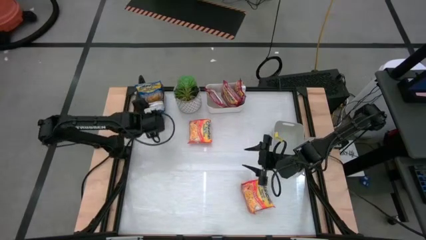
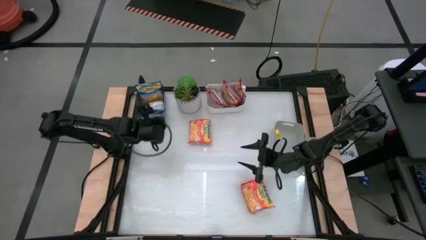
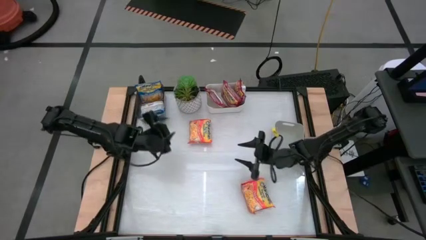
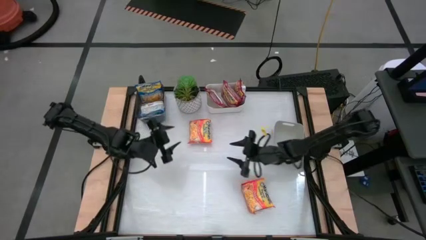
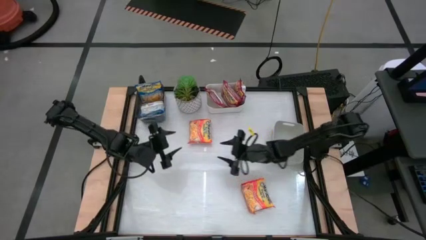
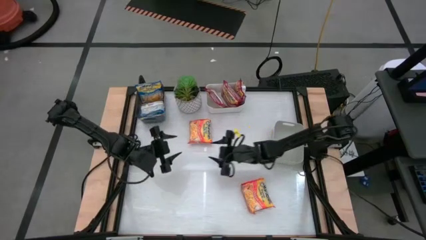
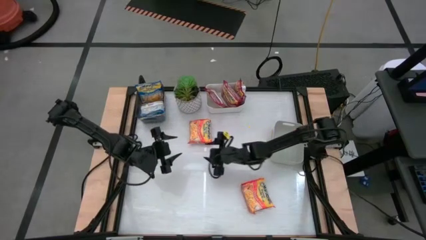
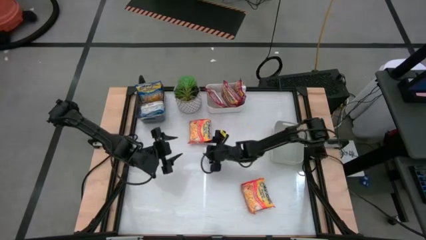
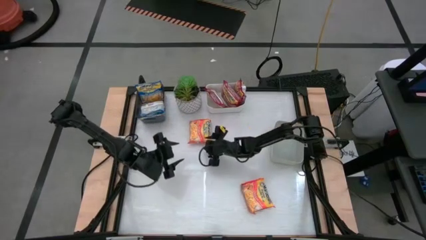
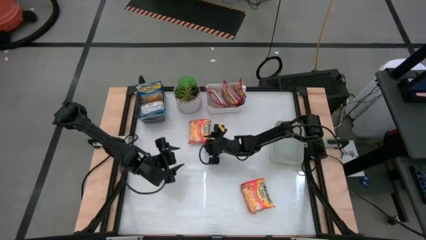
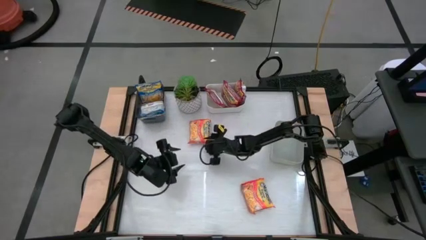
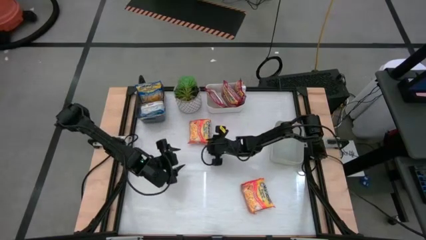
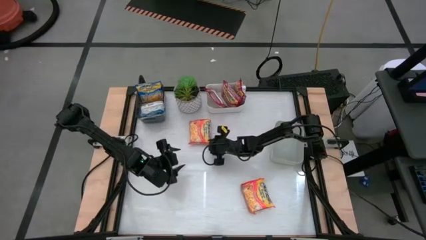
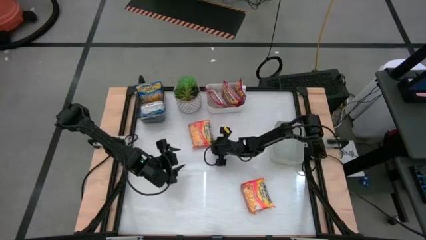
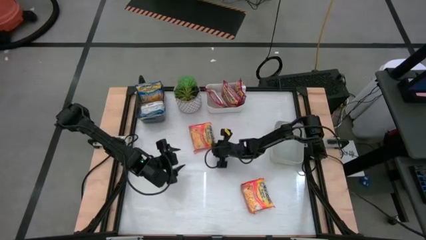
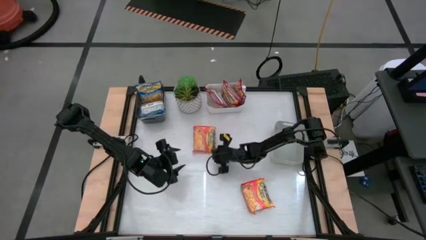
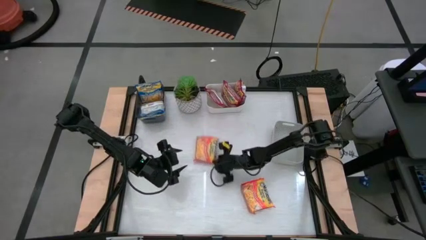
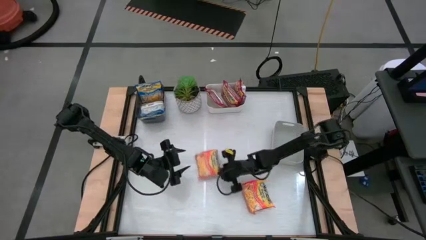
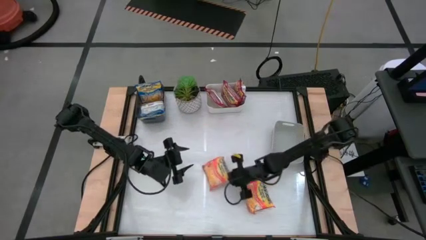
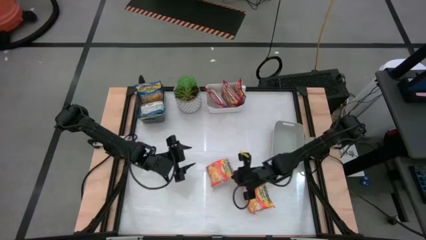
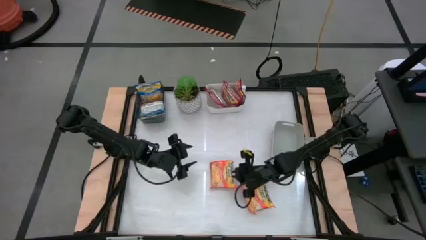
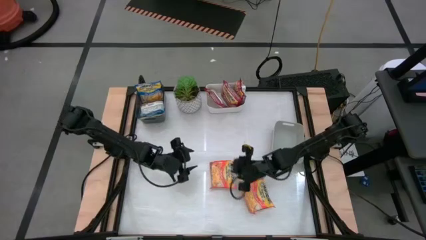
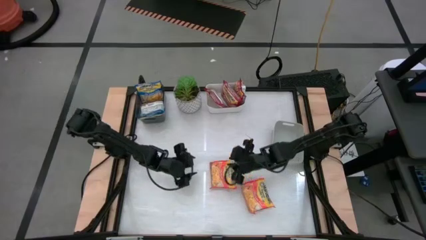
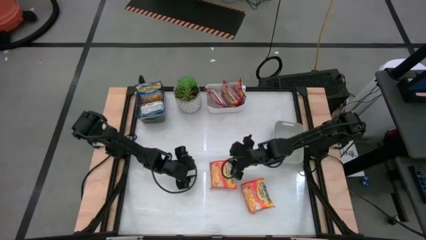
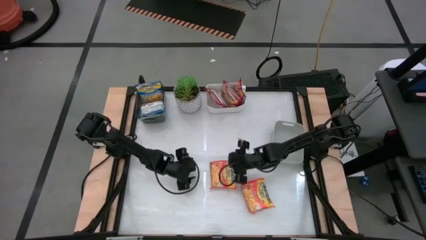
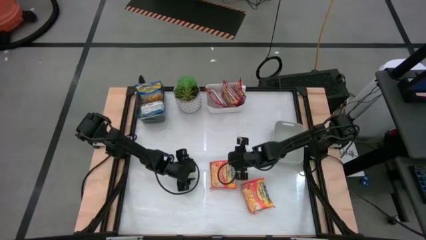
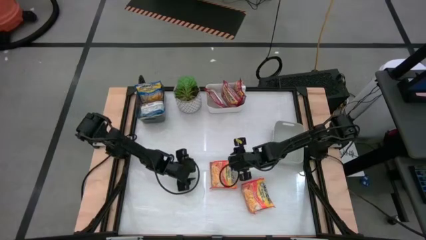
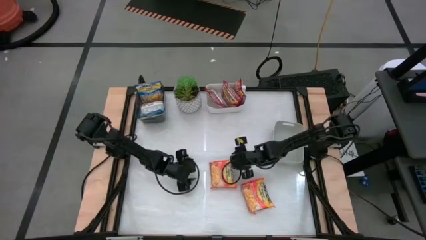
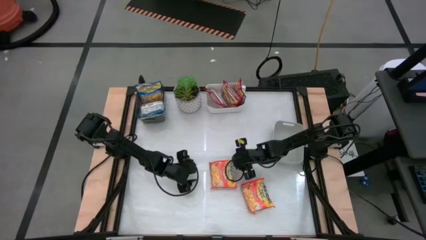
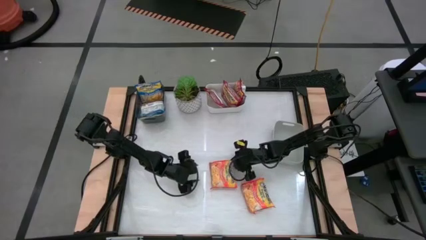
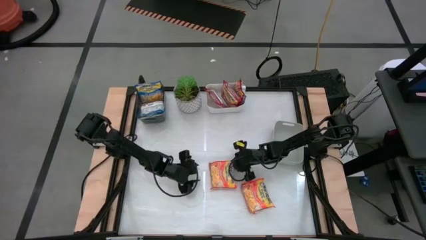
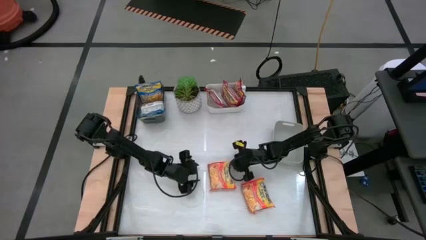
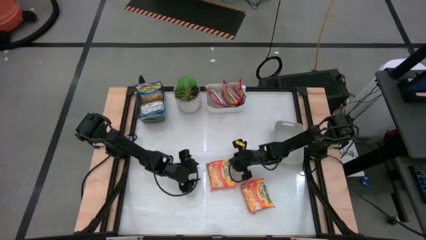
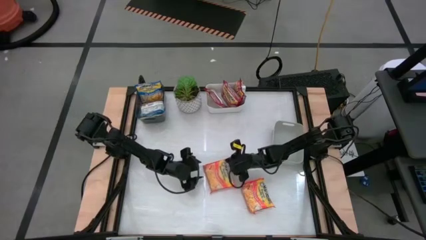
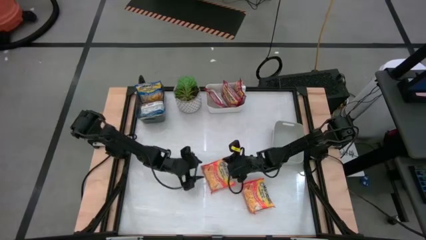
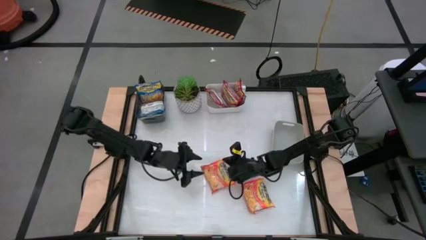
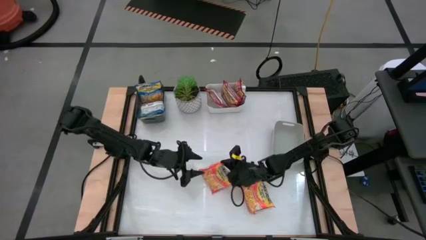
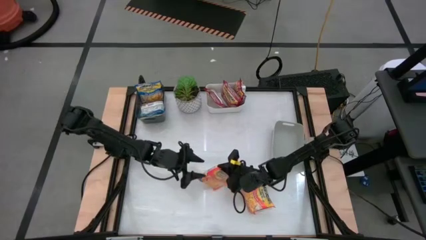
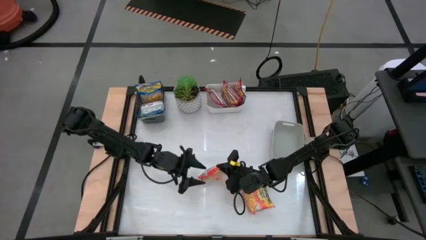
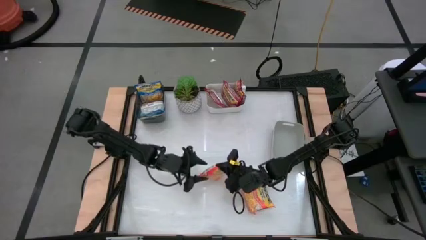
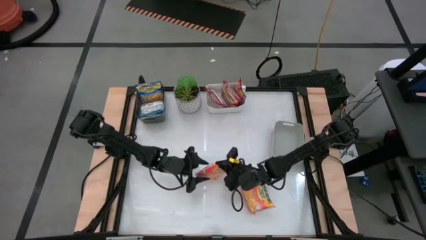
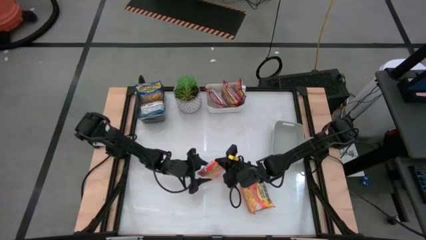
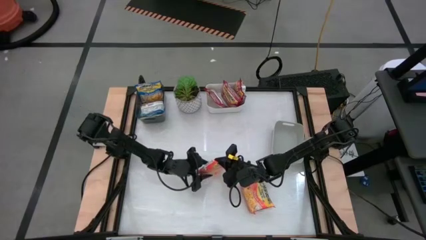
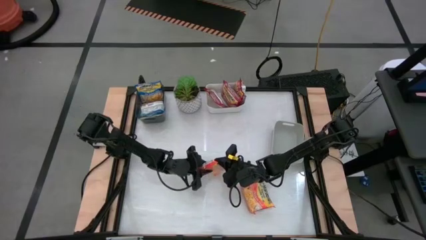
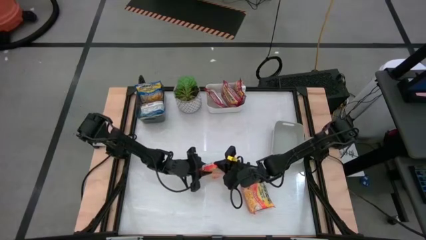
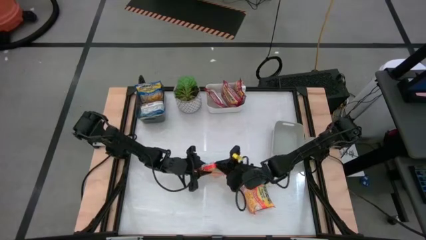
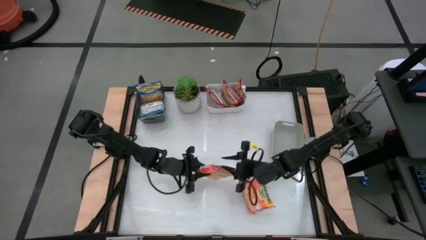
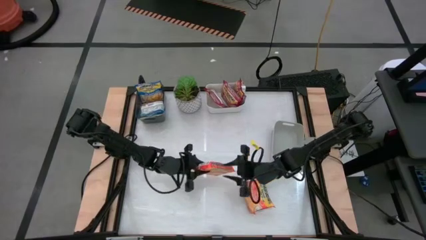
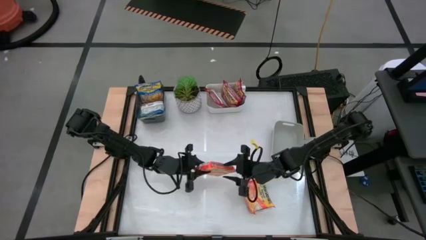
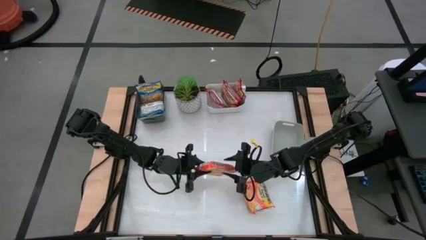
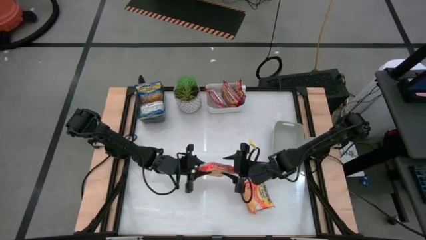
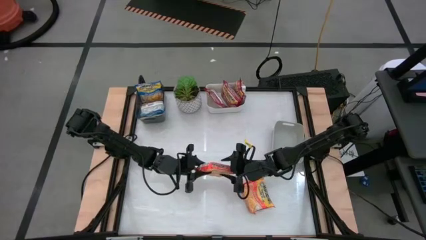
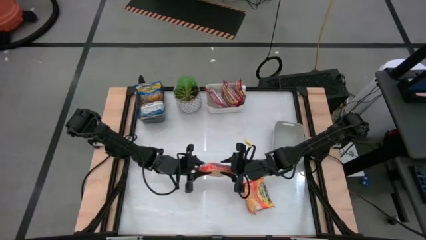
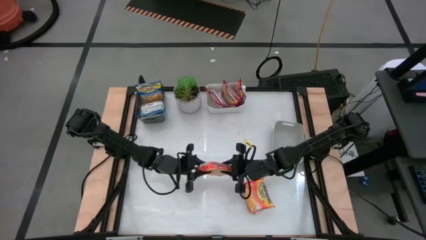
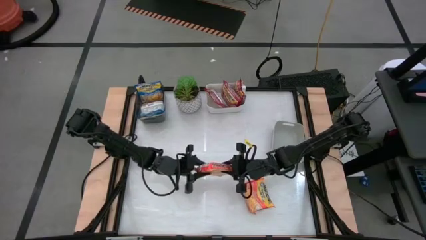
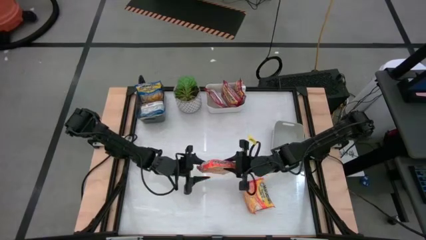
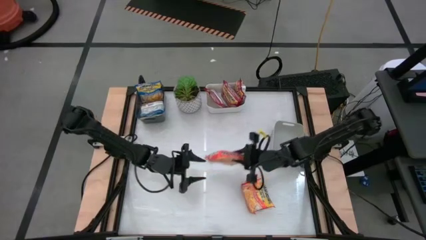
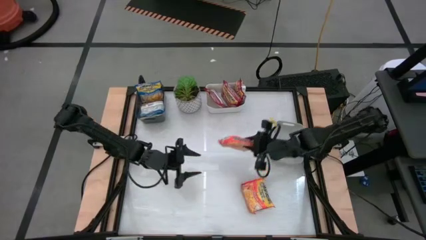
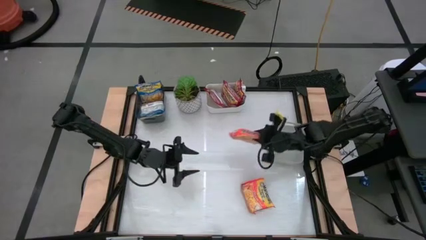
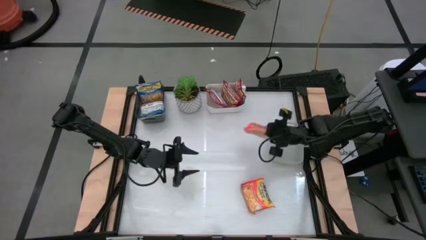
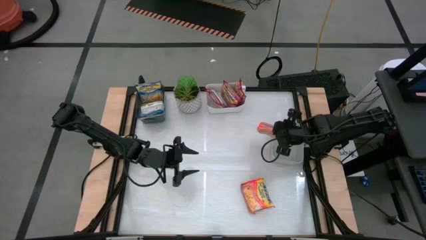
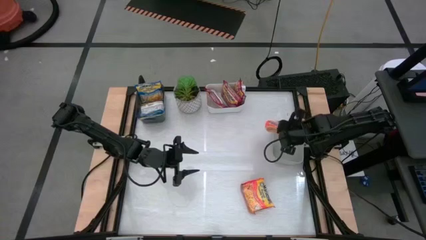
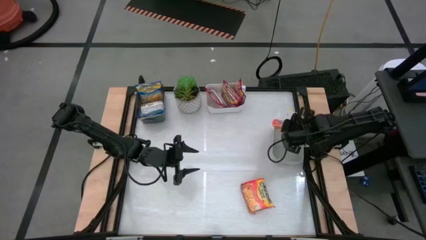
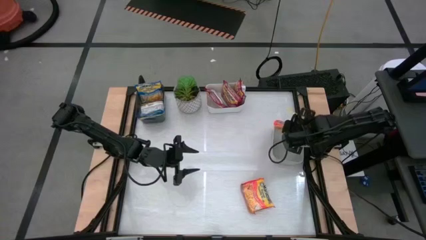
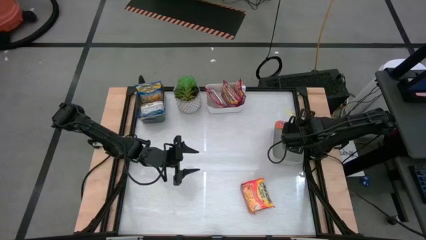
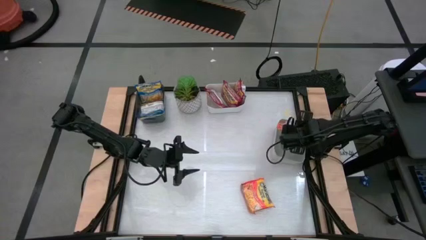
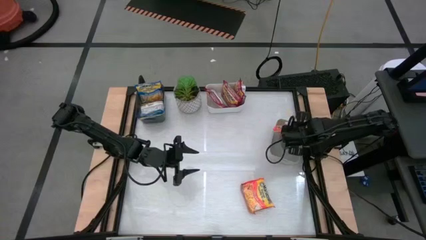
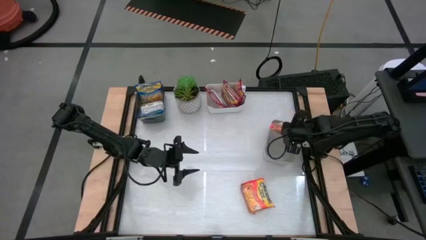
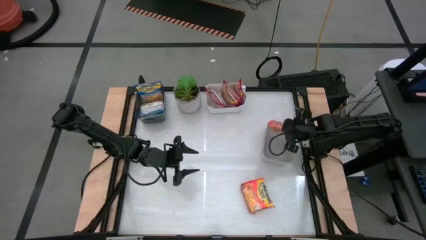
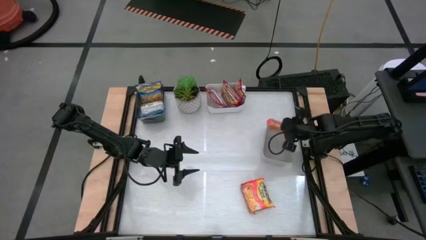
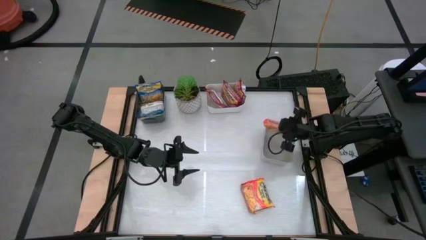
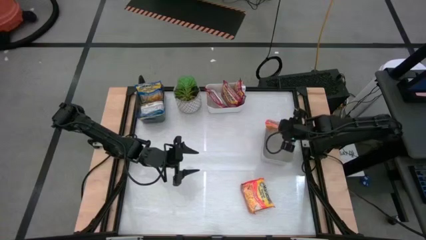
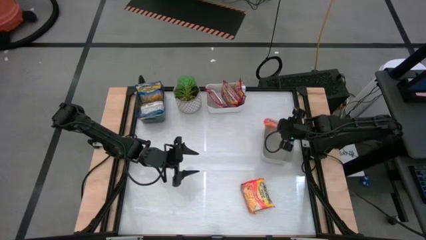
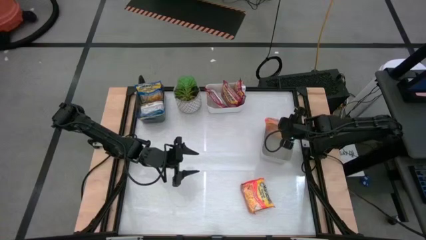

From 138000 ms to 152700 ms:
Task: Sort Maruchan noodles
Put the top orange noodle pack into the gray bin

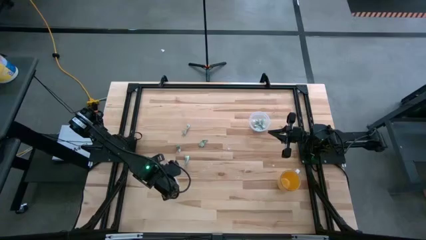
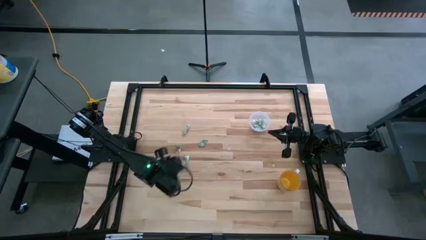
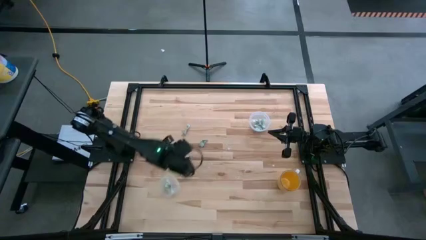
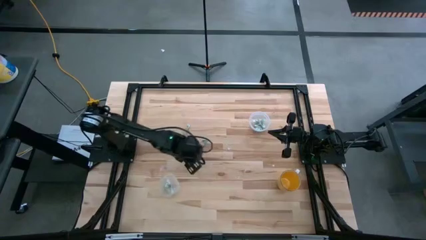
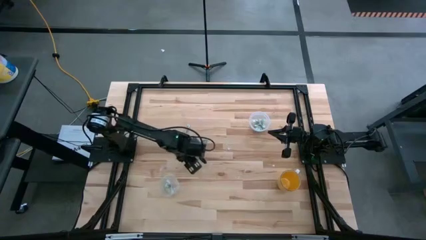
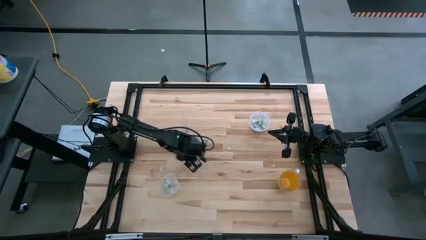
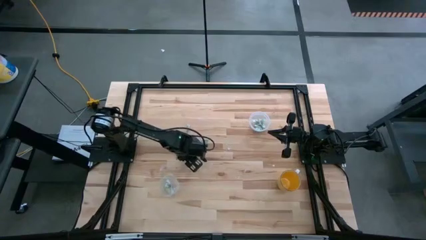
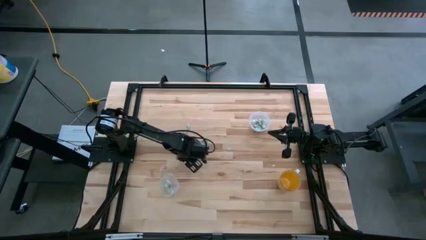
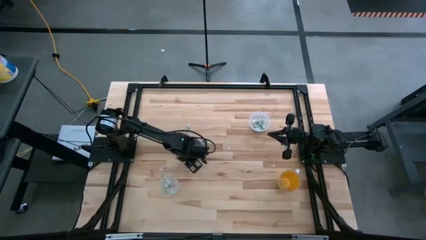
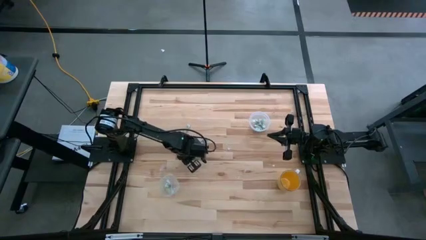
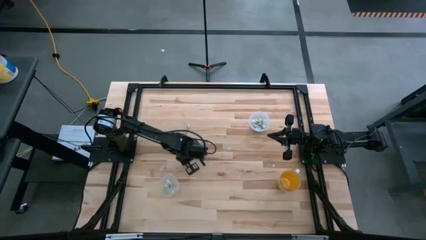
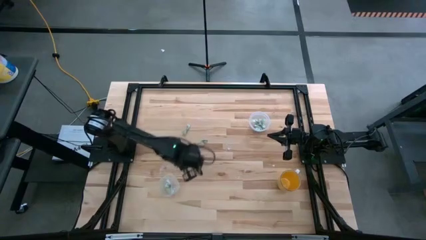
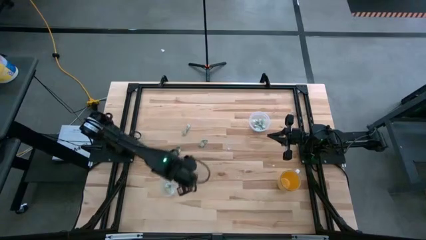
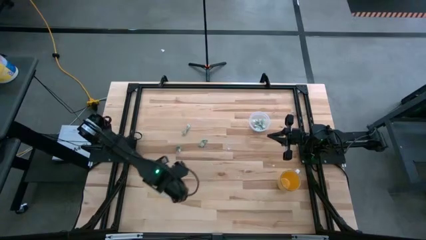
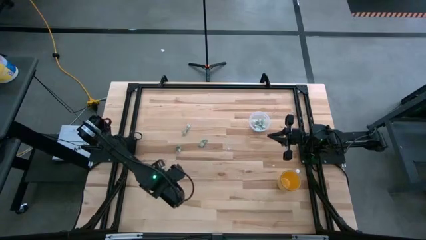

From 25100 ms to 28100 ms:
Task: Pick and place Stevia / Truvia into bins
Put the stevia packet into the oval transparent container
